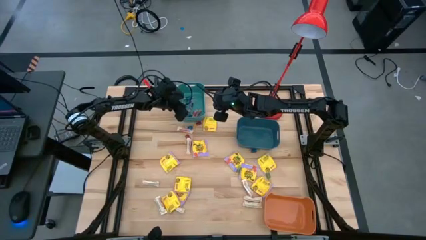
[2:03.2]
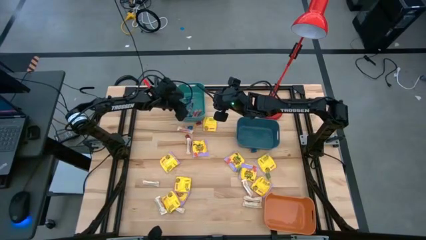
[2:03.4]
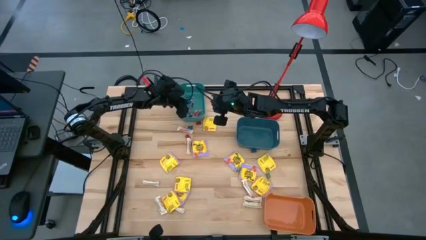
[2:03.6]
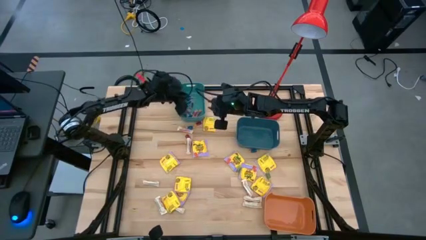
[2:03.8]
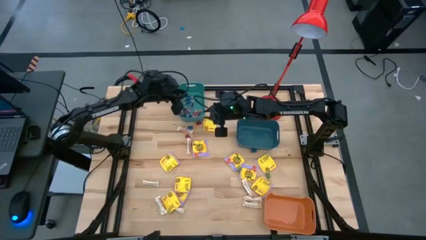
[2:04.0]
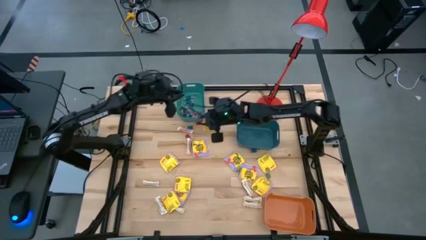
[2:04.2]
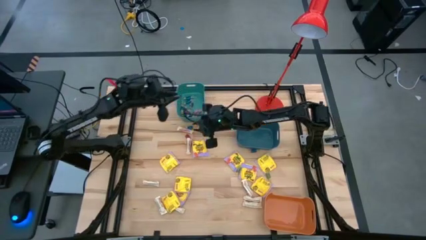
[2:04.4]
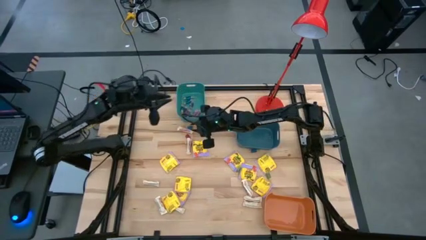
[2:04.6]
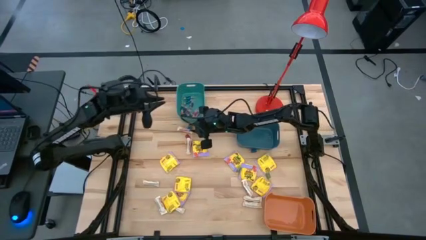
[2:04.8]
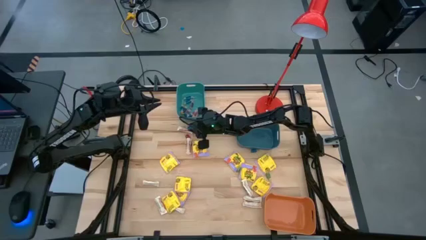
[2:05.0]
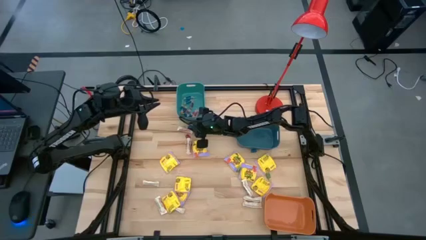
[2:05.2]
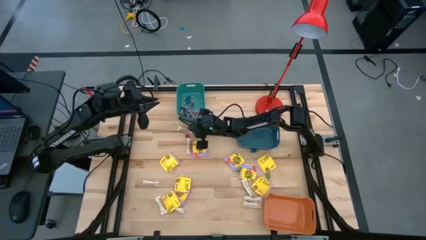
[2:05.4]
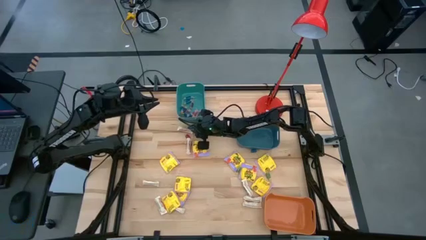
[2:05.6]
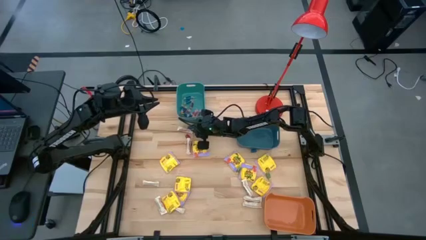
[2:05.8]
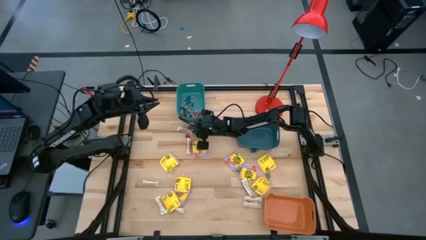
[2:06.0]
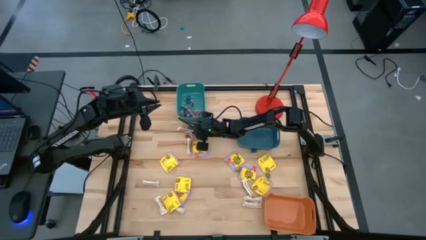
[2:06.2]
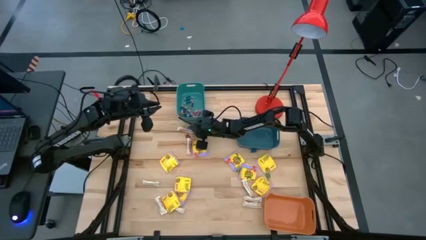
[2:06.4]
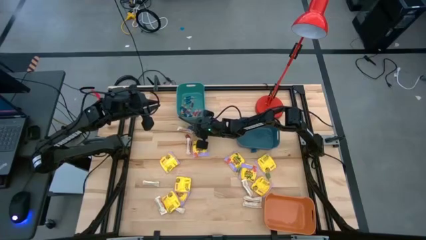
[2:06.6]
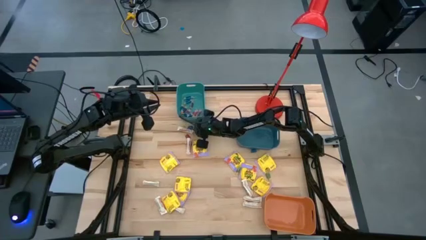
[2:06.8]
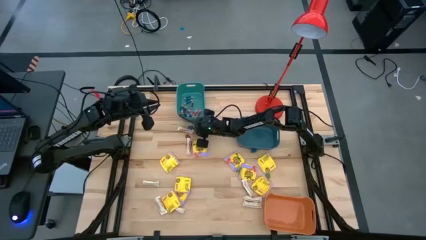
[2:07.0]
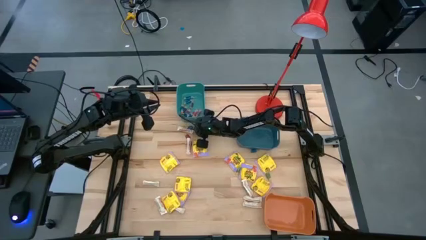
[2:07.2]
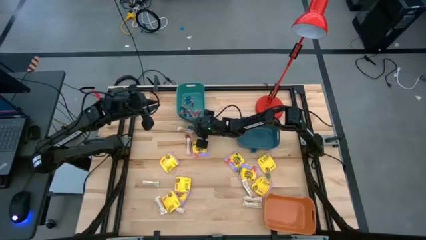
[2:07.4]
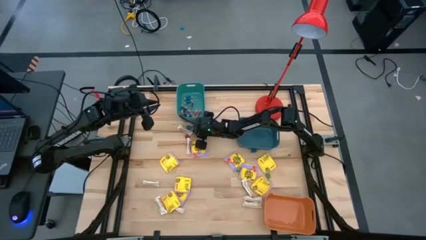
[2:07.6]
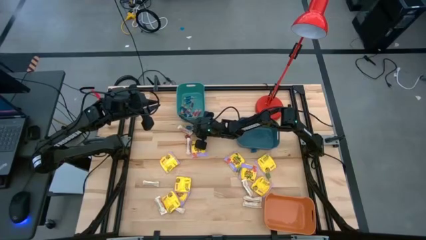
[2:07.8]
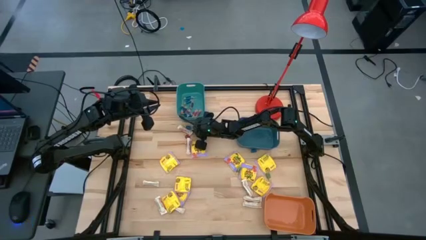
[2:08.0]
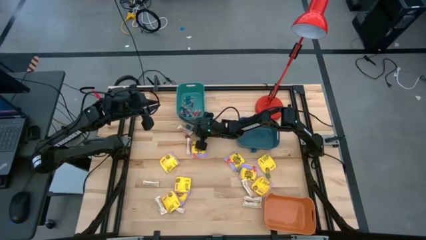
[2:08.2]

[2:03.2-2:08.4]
Task: Sort candy
Put the blue candy into the green bin

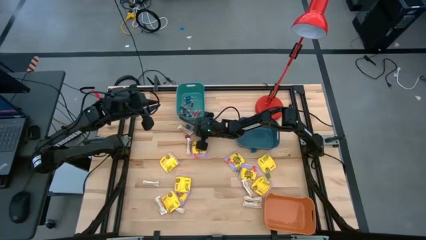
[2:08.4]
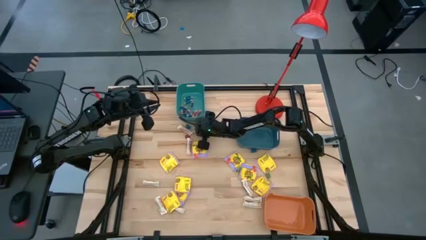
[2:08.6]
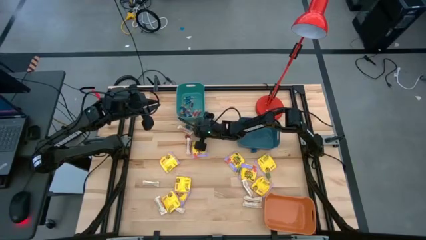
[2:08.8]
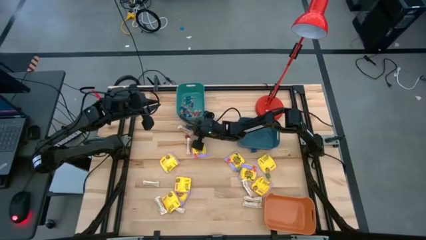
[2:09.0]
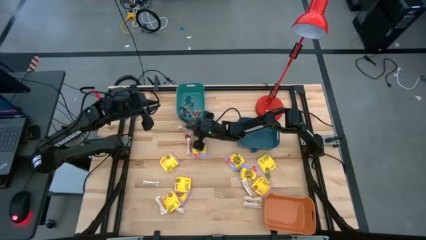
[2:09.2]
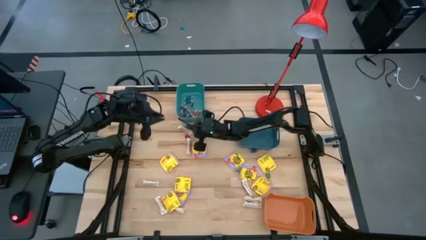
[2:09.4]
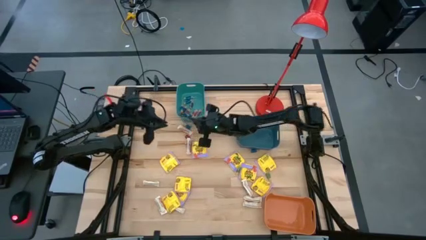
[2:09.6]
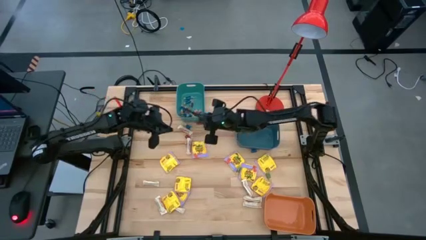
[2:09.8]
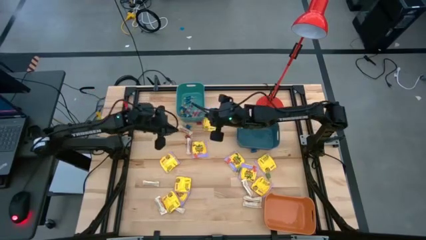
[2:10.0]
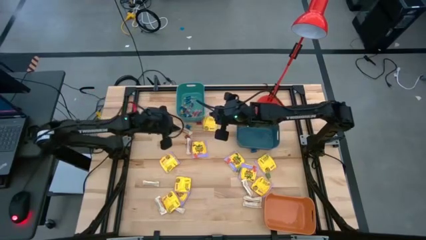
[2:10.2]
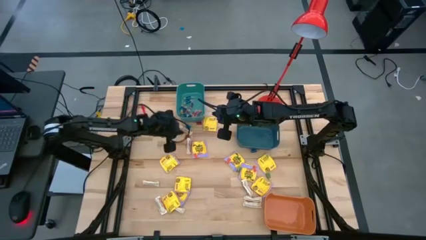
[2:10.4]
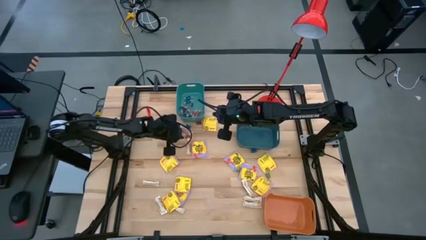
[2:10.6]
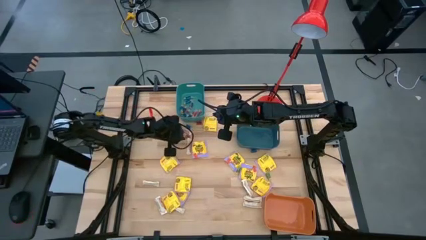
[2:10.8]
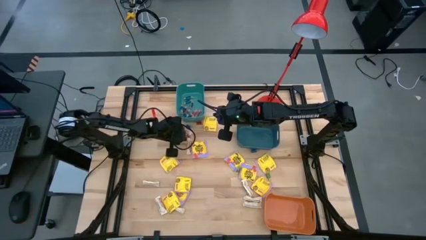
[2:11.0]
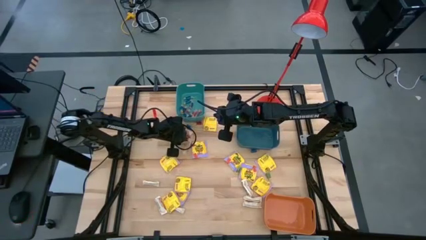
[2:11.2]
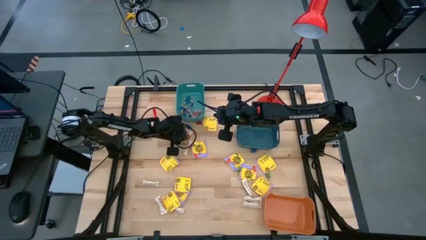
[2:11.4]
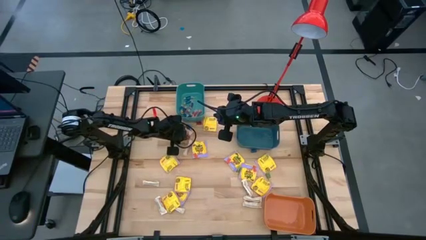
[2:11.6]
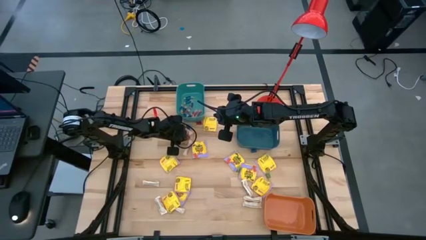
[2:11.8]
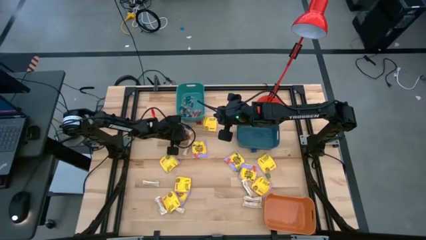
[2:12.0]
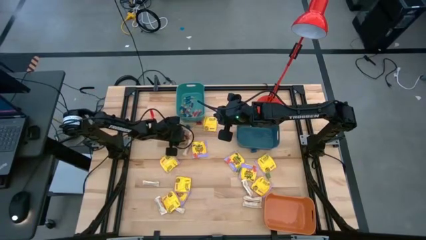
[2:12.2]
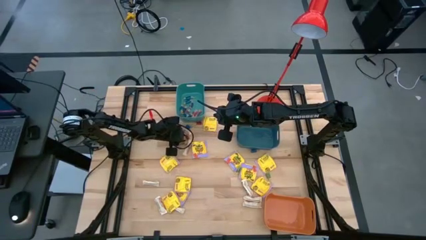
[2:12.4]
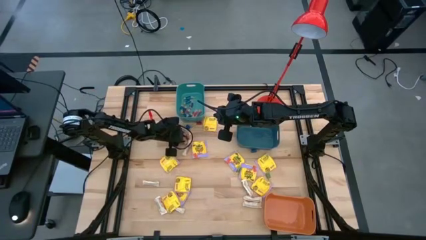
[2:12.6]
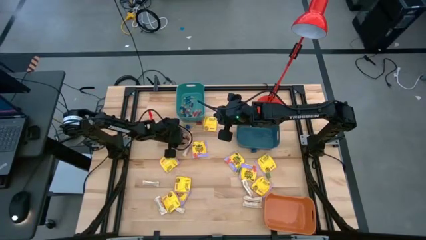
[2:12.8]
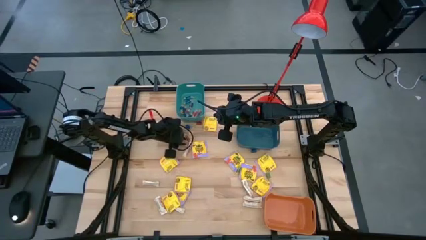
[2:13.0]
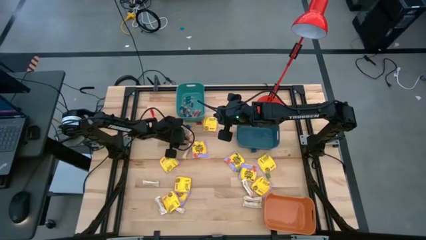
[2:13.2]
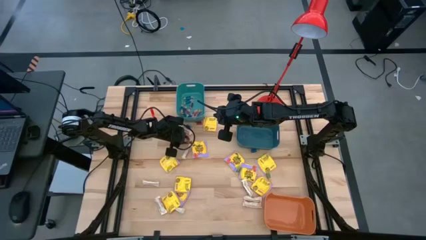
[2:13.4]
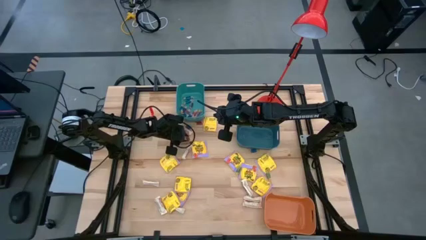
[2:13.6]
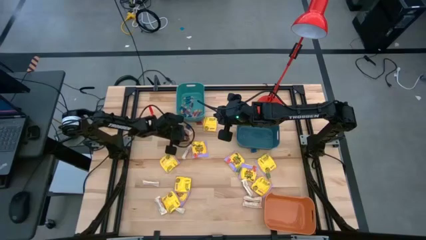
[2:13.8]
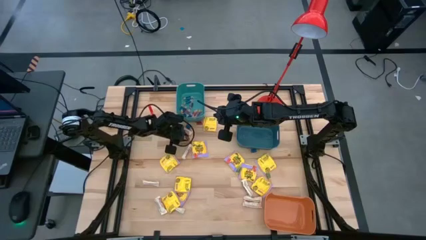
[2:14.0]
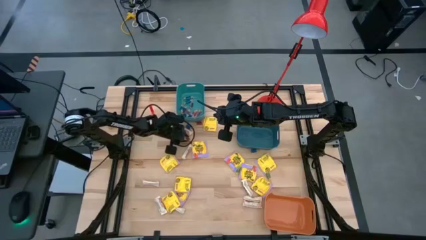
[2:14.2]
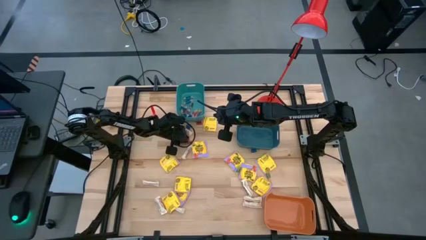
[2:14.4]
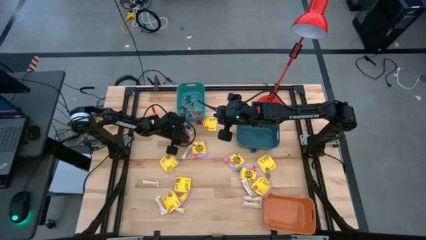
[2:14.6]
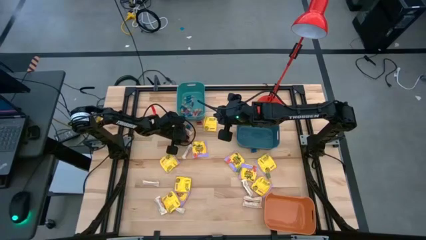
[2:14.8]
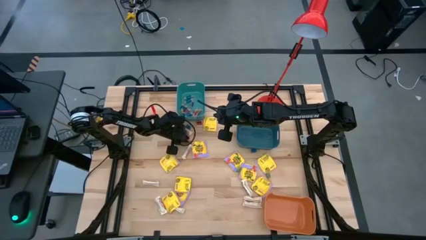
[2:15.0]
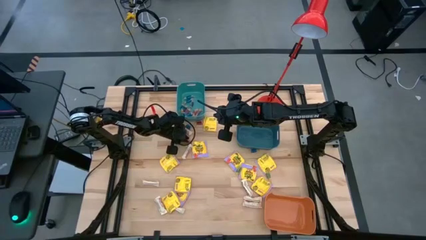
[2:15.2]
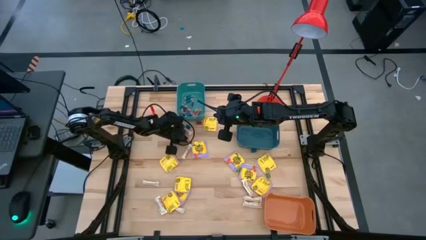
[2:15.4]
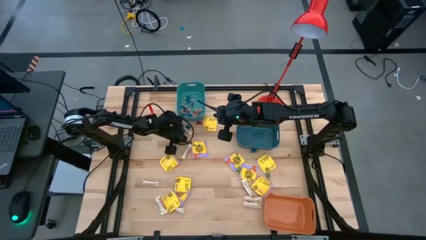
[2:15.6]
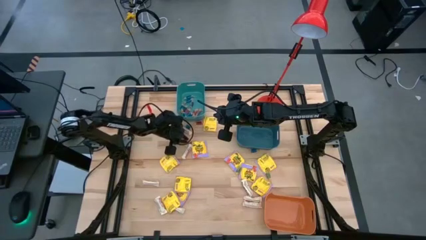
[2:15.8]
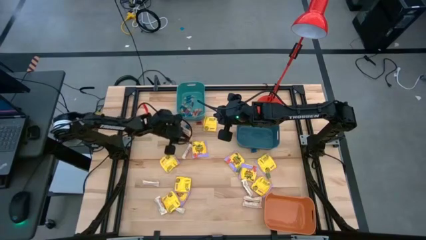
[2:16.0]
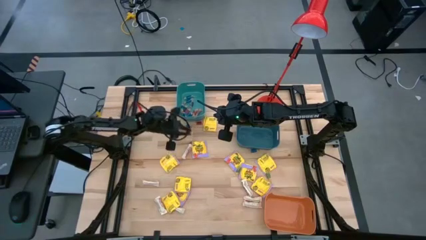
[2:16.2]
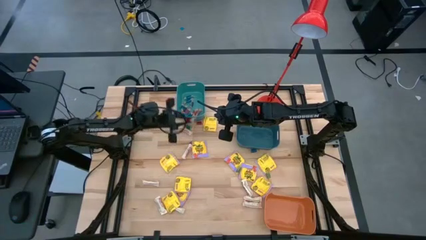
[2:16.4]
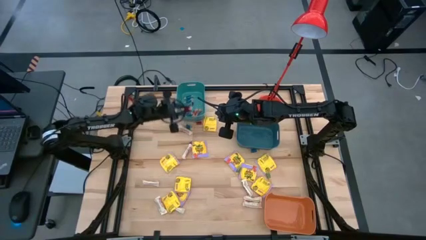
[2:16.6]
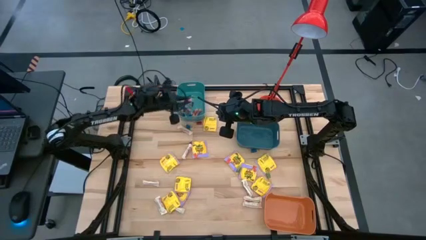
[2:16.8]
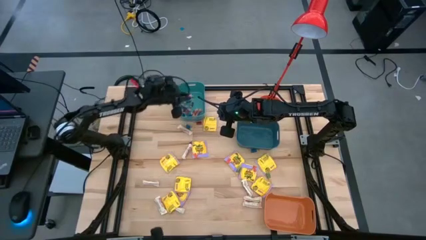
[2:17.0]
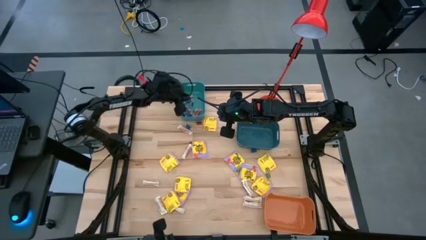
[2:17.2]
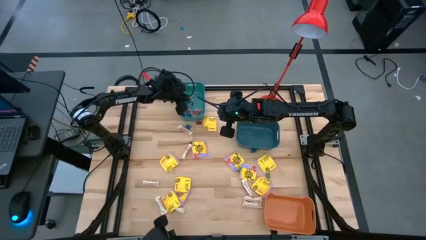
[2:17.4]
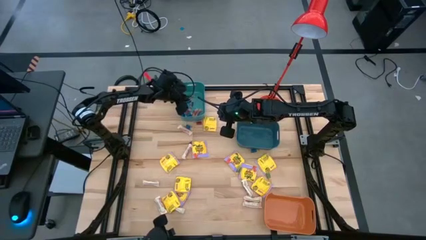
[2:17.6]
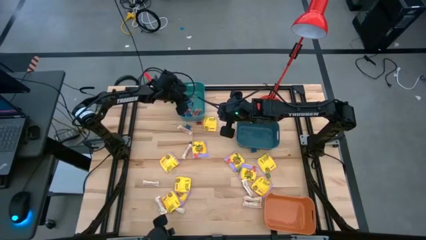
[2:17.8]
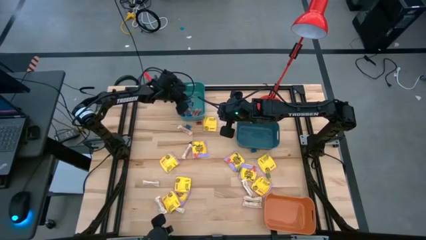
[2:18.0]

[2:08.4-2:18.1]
Put the red candy into the green bin
